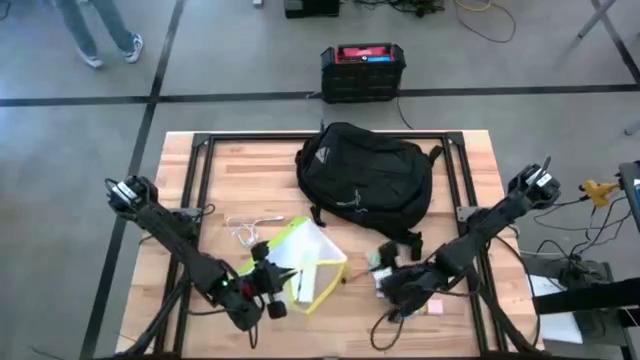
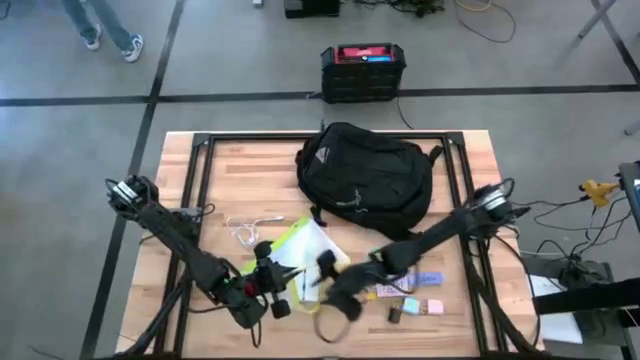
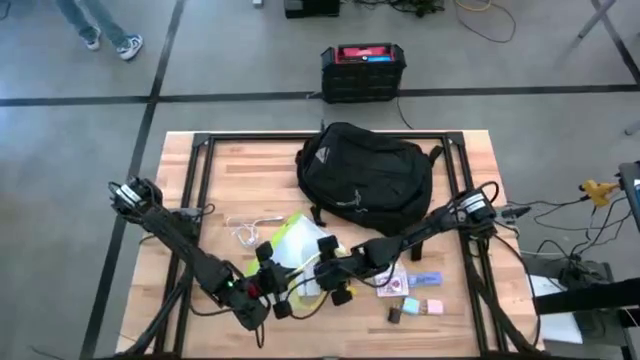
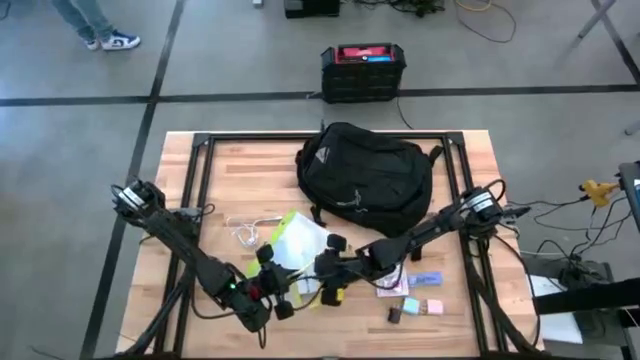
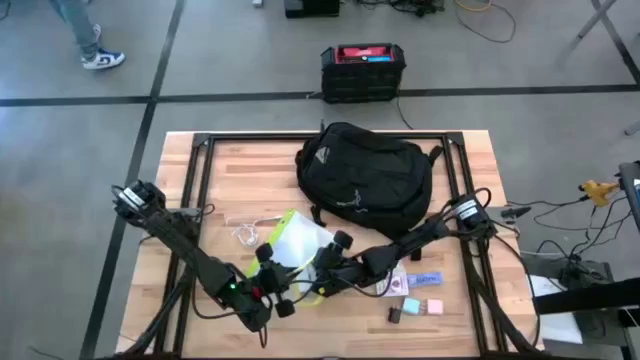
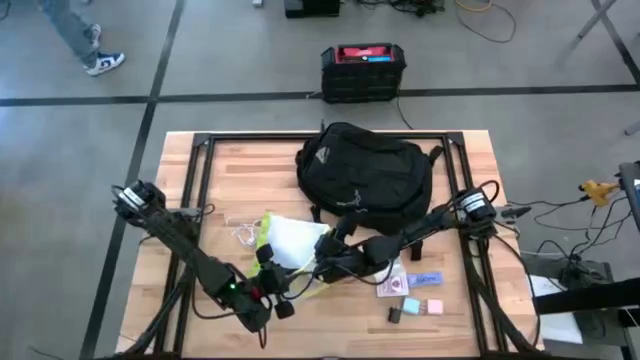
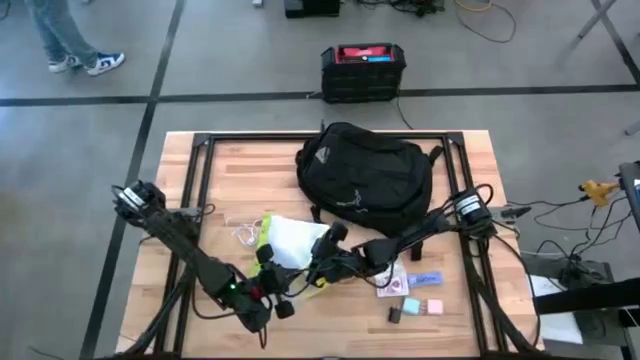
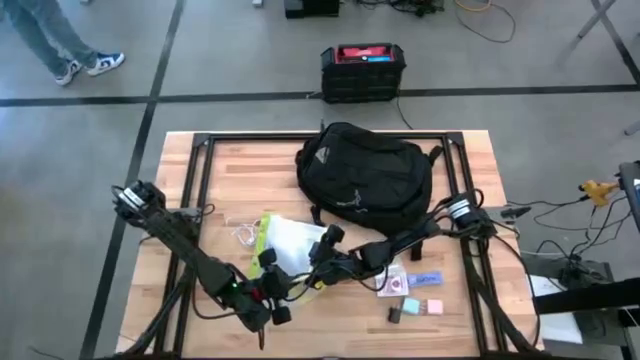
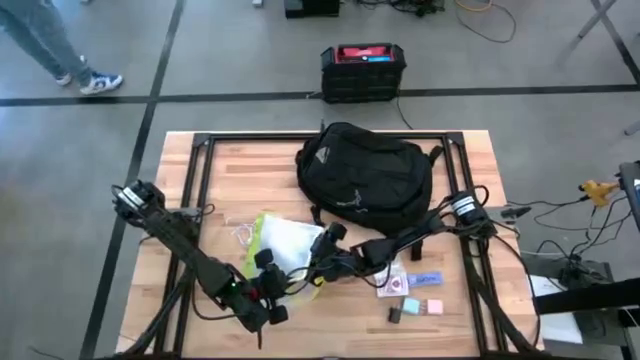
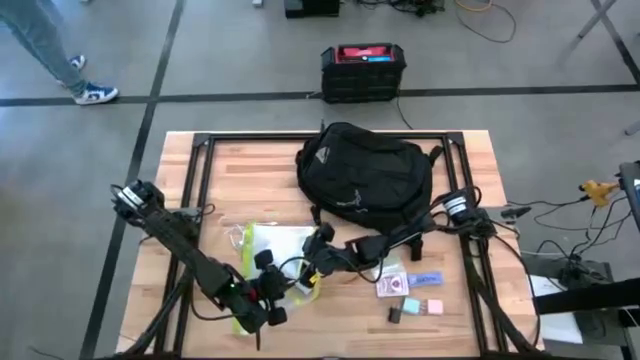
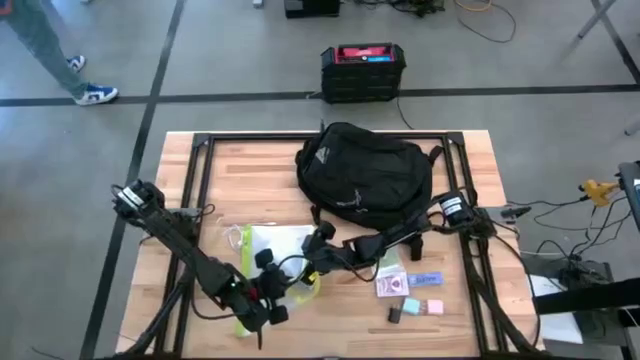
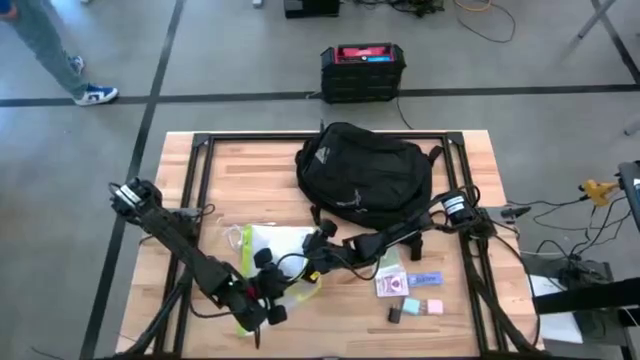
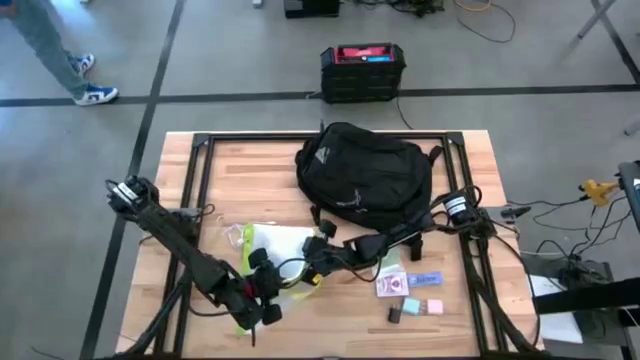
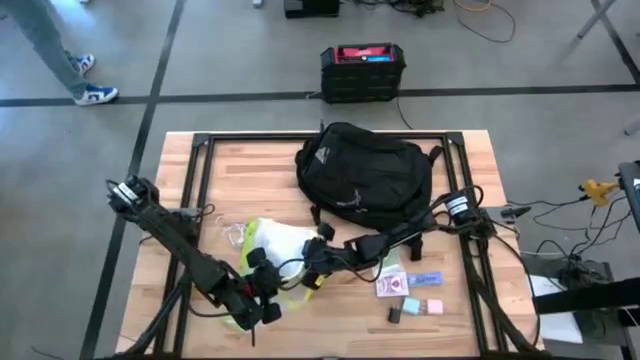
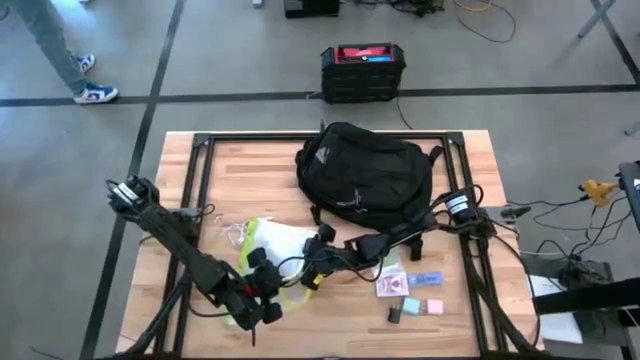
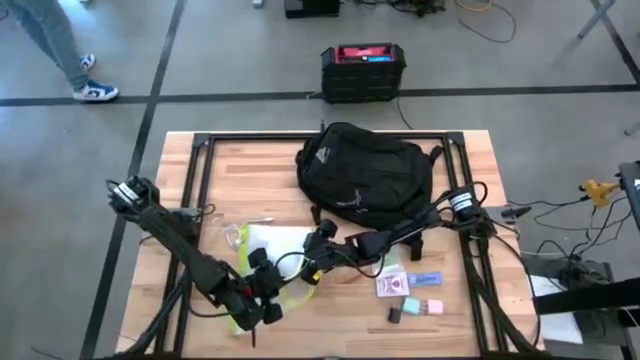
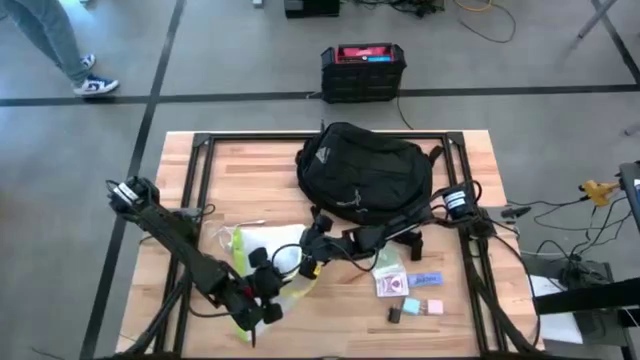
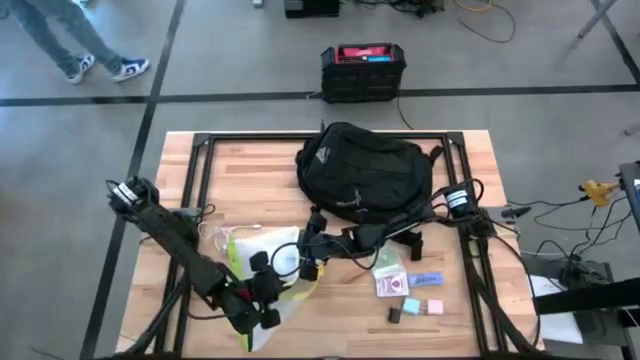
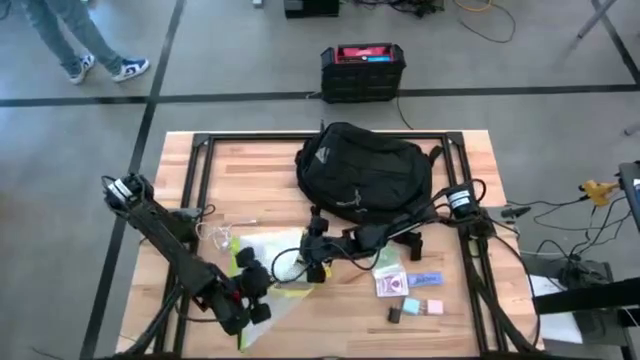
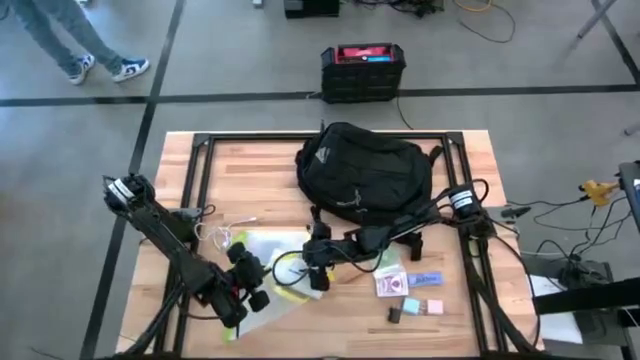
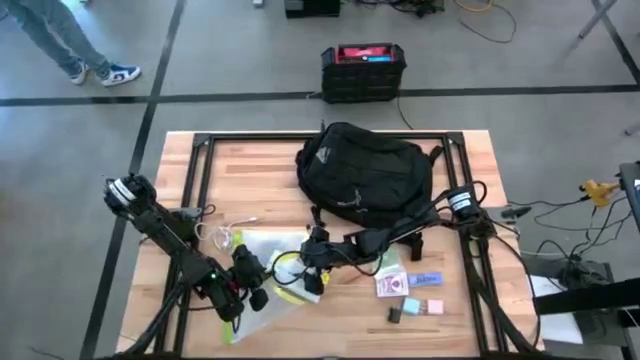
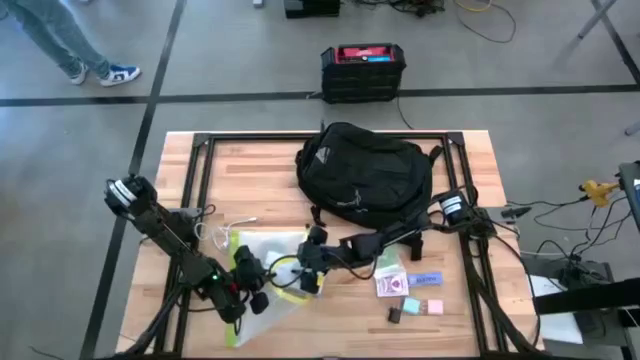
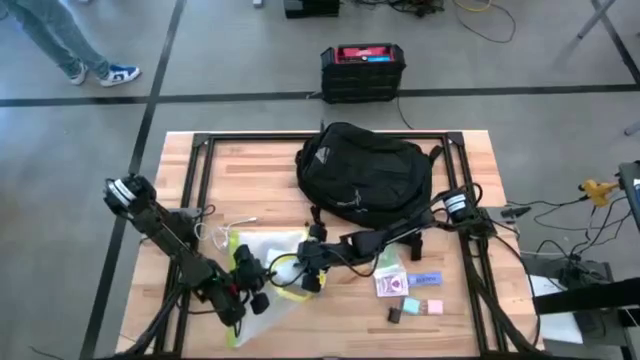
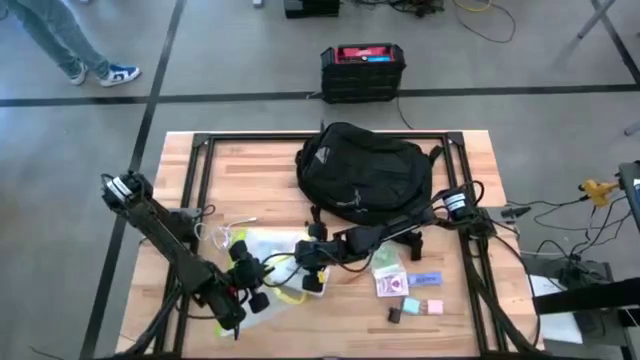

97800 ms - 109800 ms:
Task: Unpack backpack
Remove the white medicine organizer from the yellow green zip bag

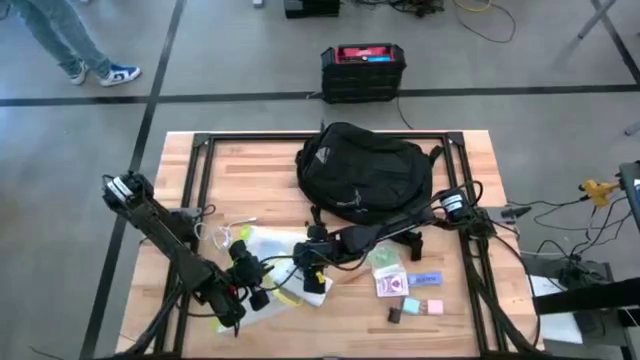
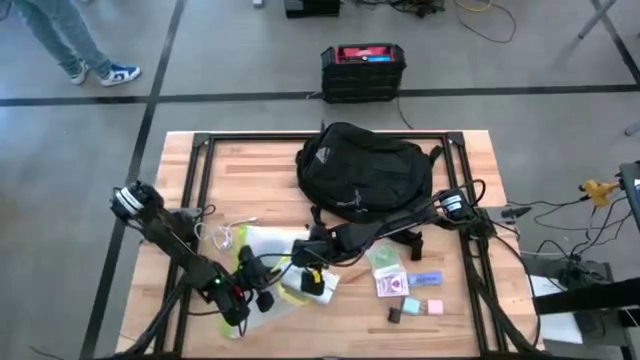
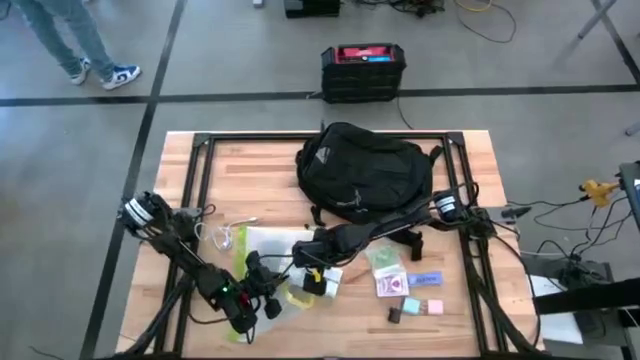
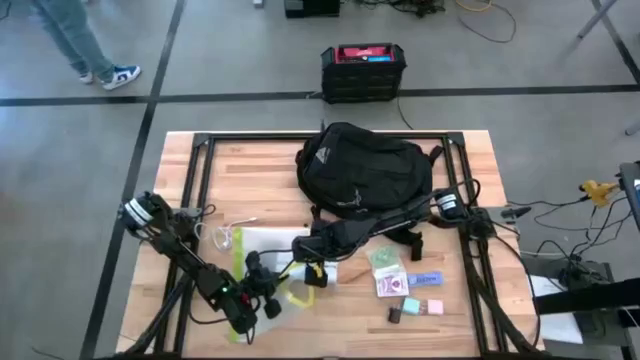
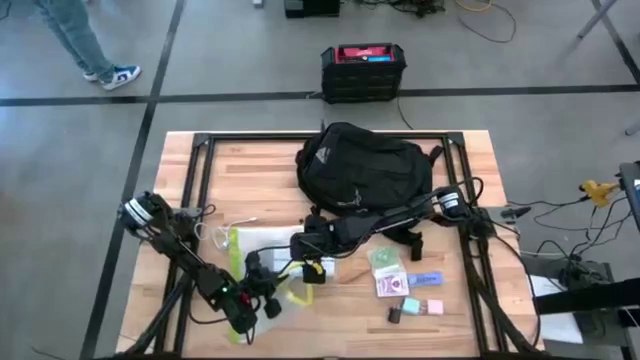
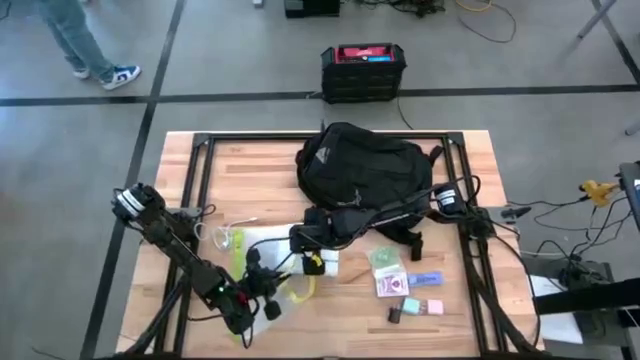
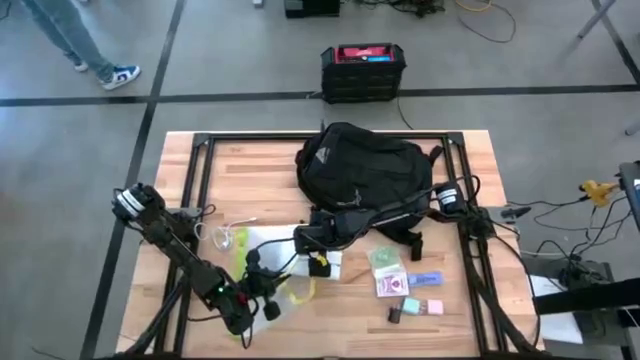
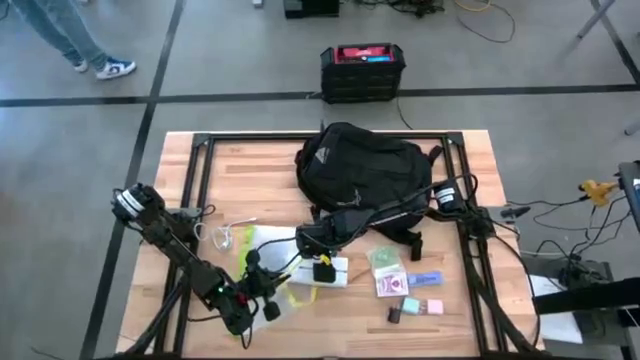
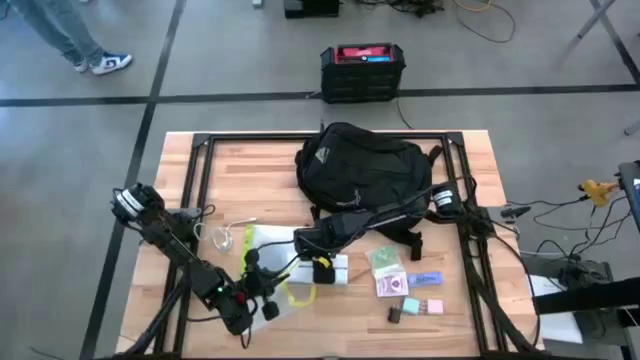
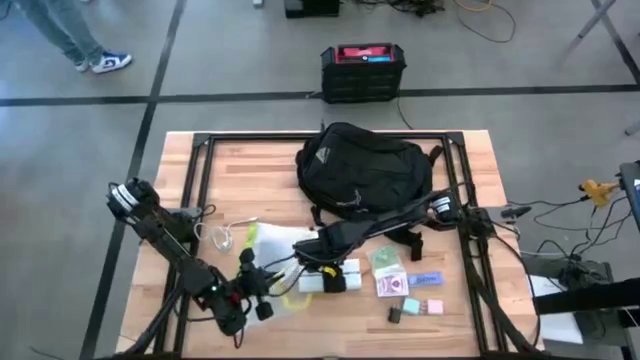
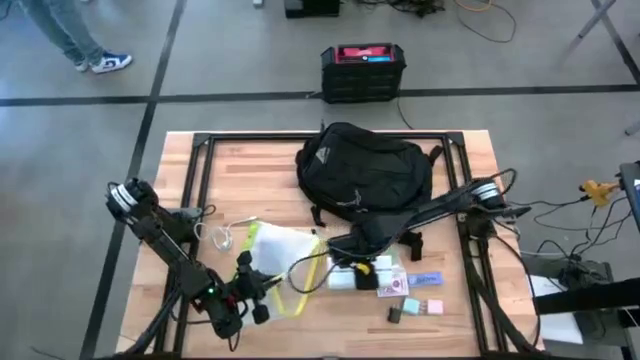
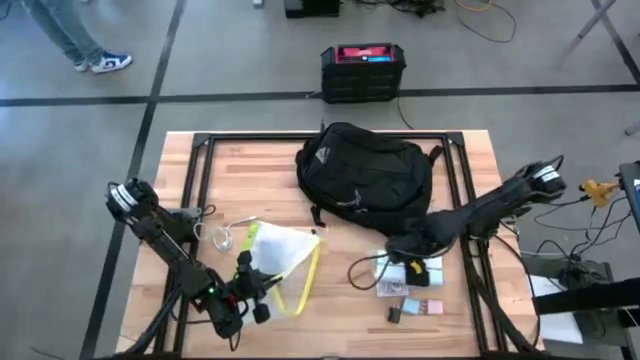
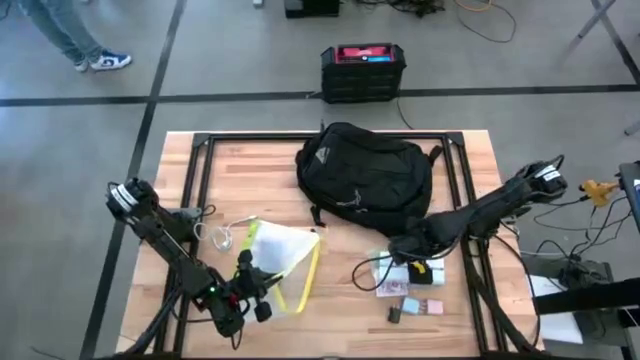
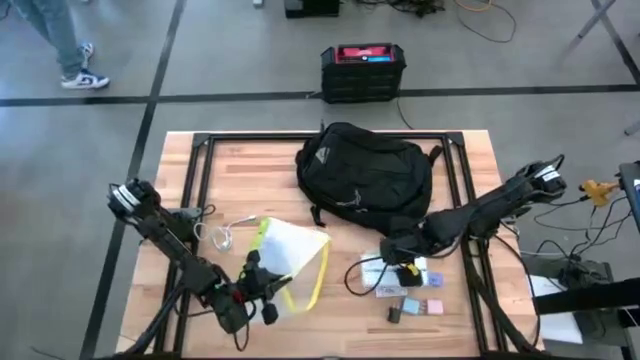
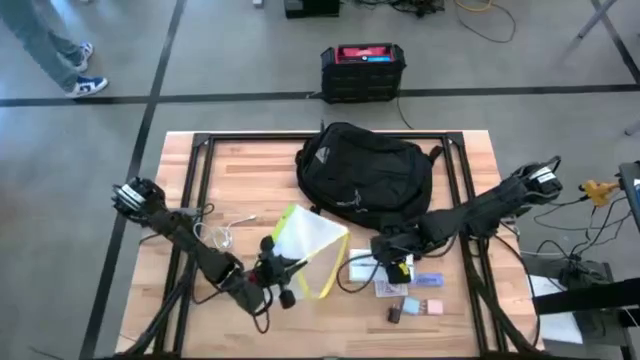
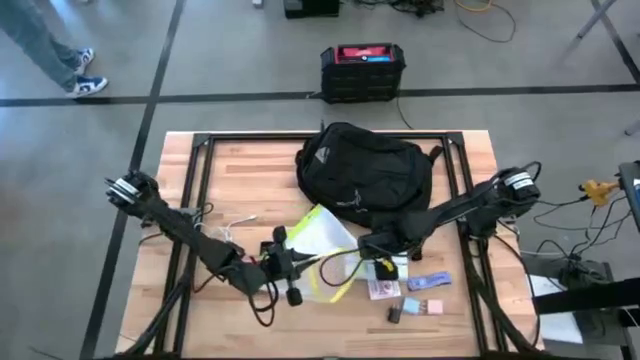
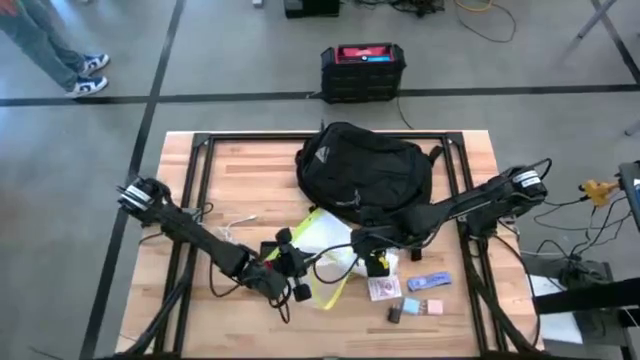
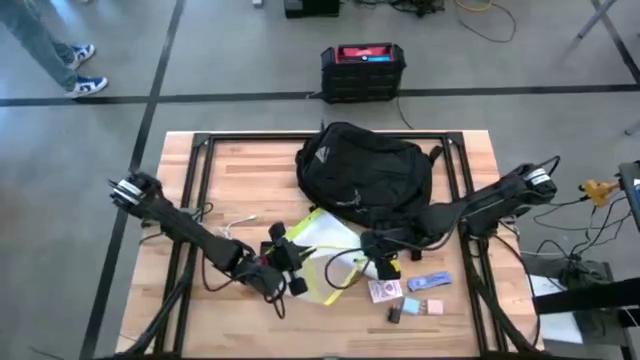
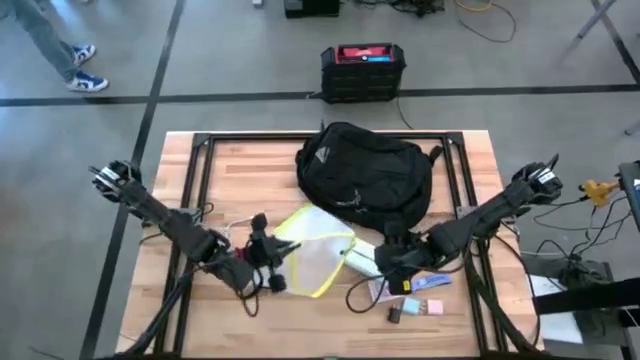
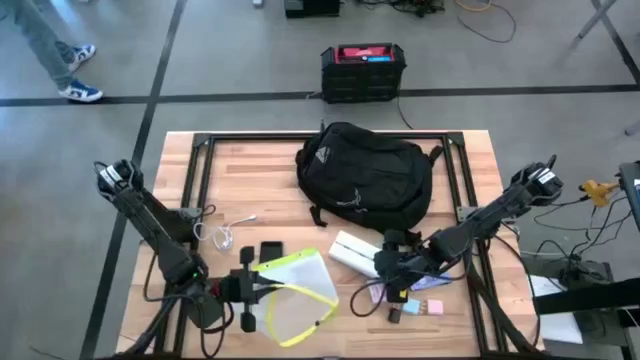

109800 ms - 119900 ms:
Remove the white medicine organizer from the yellow green zip bag

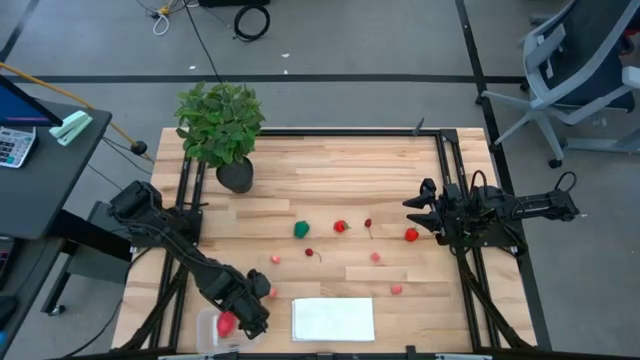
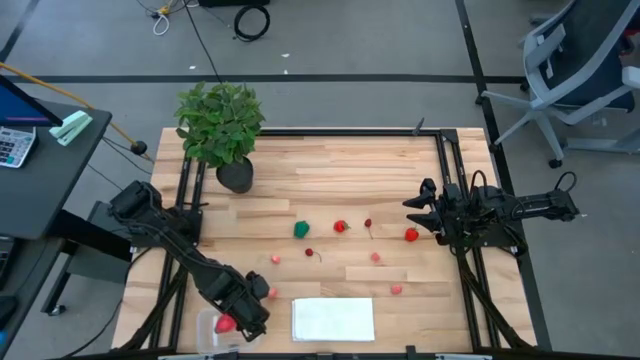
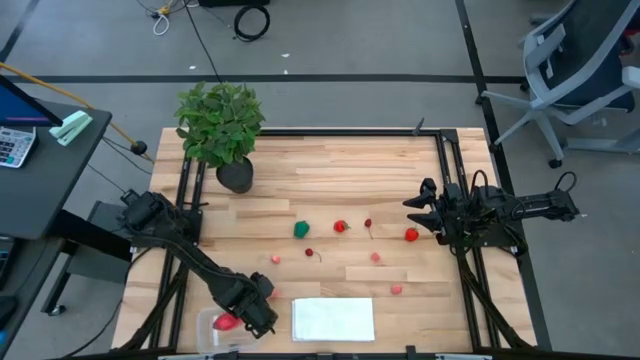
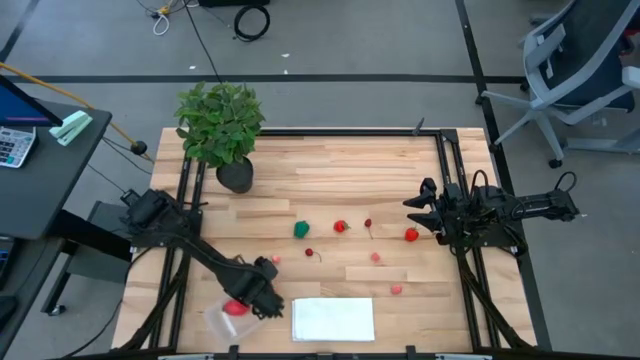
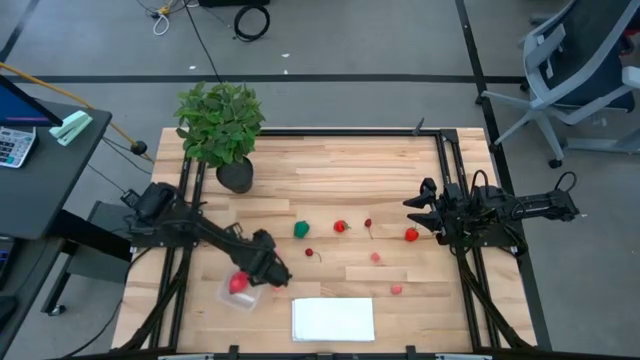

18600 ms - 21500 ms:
Task: Pick and placing Produce into tupperware
Move the transparent bin to the middle left of the table
